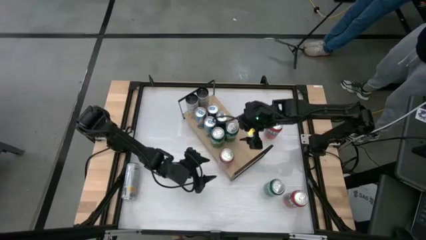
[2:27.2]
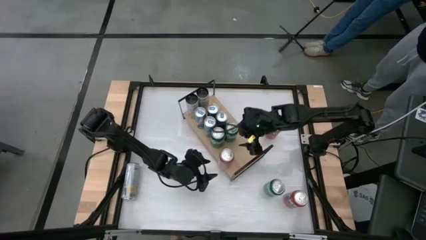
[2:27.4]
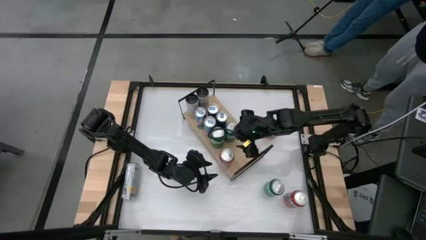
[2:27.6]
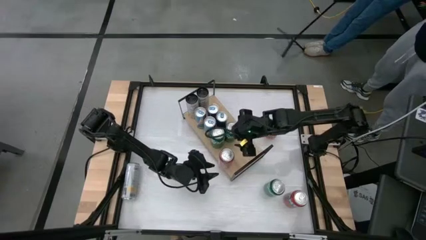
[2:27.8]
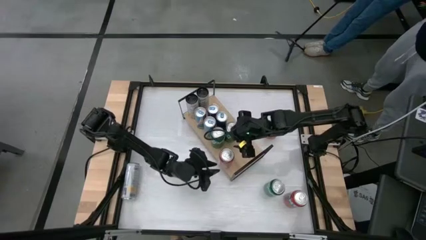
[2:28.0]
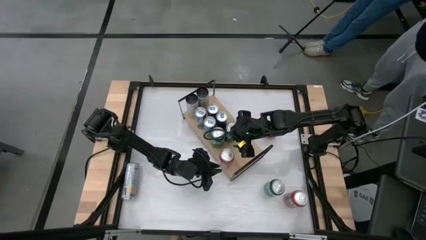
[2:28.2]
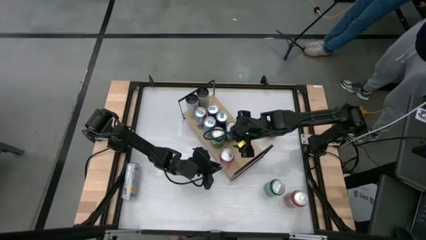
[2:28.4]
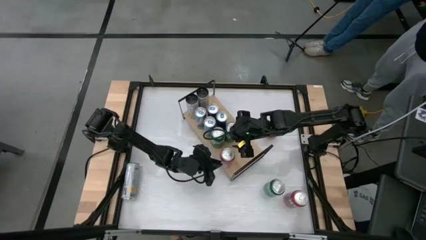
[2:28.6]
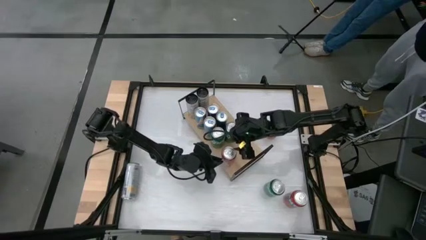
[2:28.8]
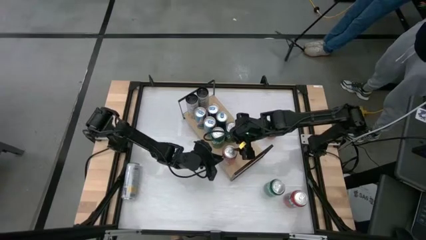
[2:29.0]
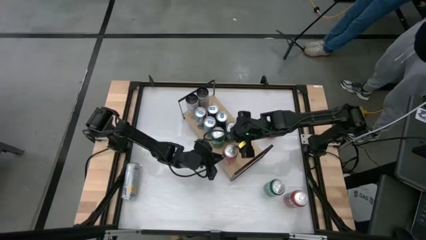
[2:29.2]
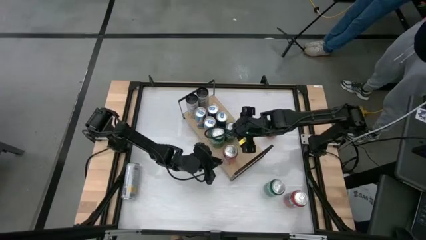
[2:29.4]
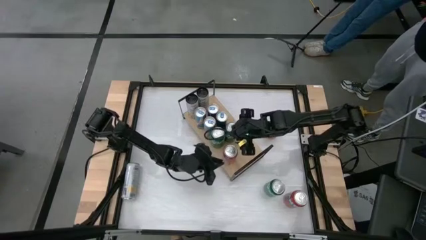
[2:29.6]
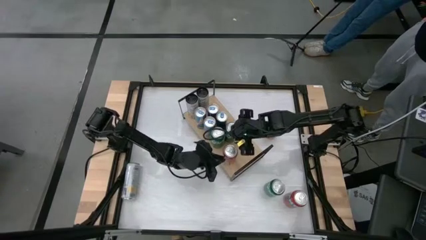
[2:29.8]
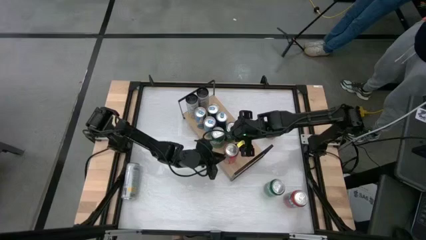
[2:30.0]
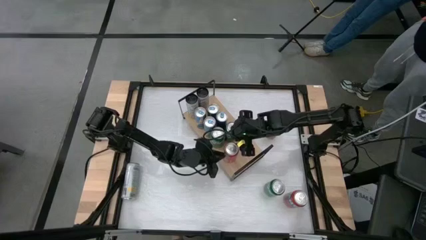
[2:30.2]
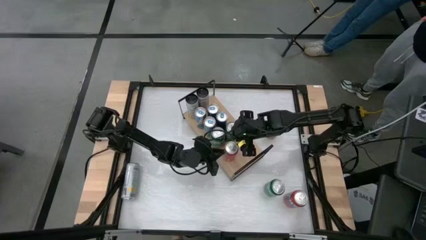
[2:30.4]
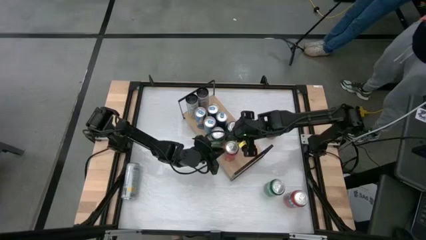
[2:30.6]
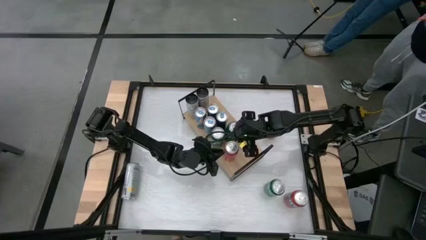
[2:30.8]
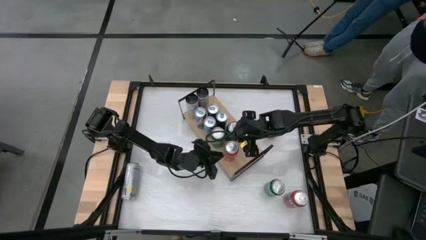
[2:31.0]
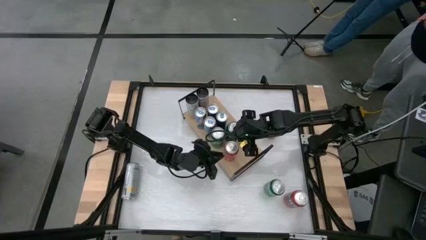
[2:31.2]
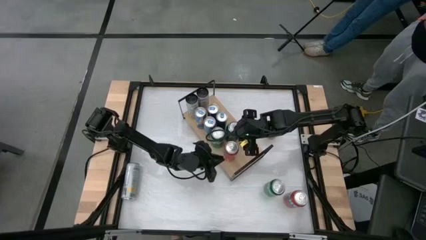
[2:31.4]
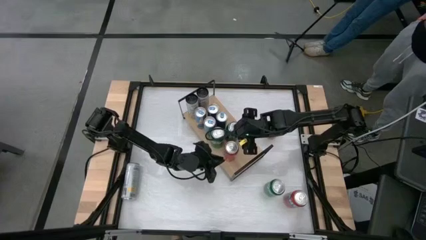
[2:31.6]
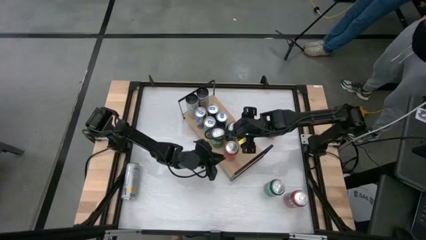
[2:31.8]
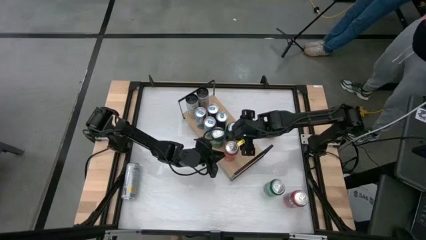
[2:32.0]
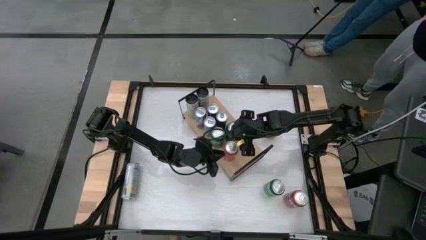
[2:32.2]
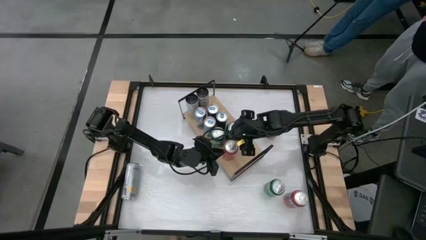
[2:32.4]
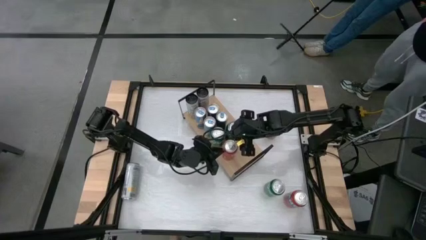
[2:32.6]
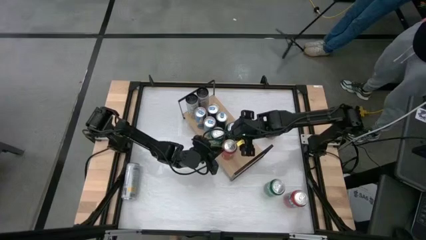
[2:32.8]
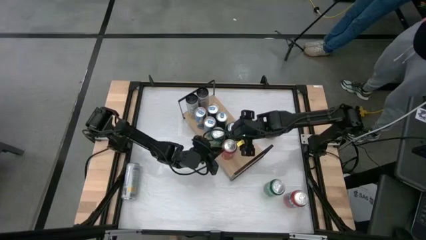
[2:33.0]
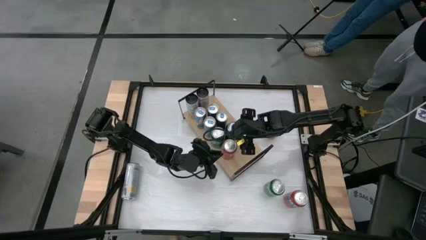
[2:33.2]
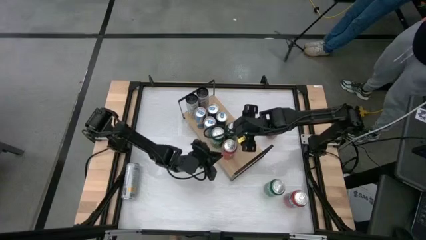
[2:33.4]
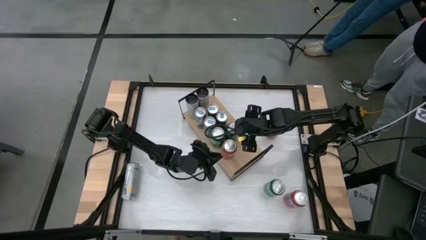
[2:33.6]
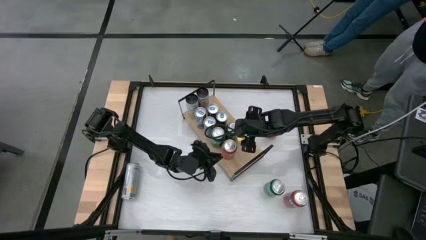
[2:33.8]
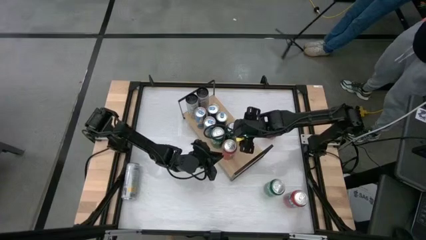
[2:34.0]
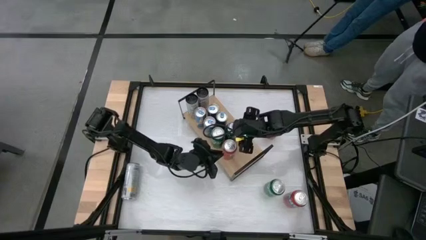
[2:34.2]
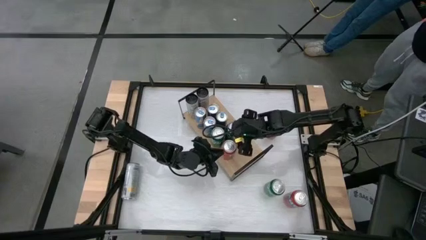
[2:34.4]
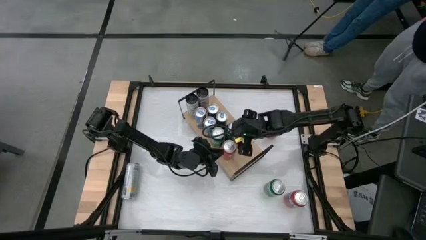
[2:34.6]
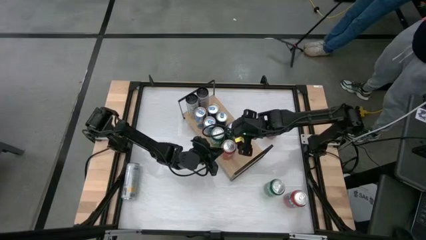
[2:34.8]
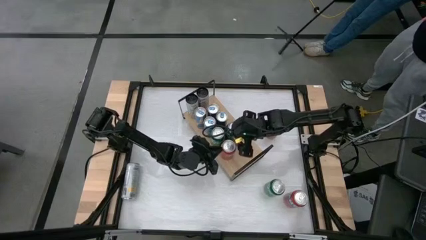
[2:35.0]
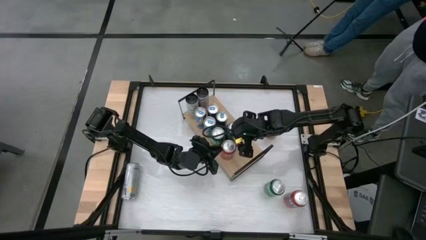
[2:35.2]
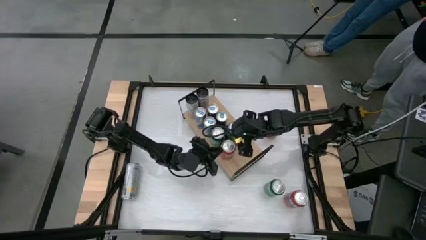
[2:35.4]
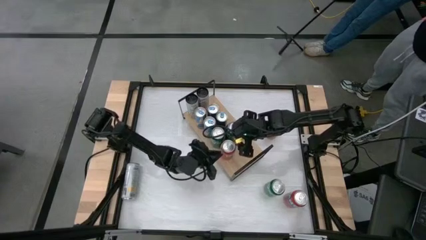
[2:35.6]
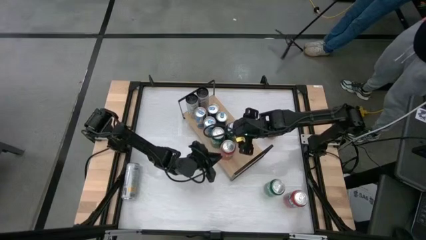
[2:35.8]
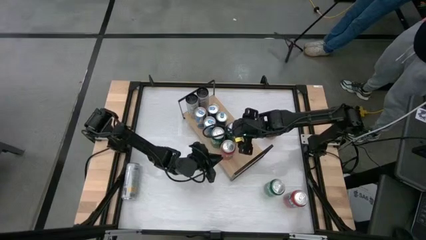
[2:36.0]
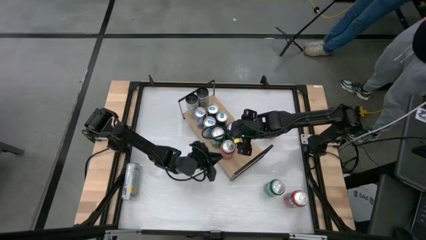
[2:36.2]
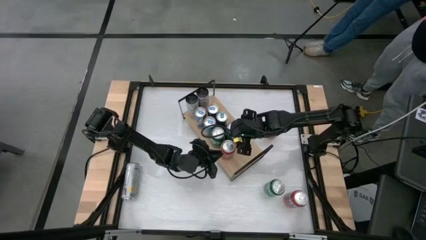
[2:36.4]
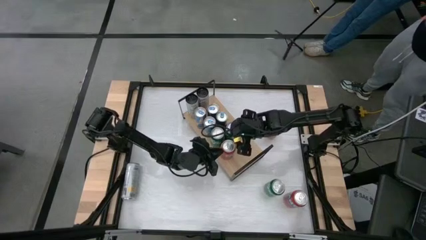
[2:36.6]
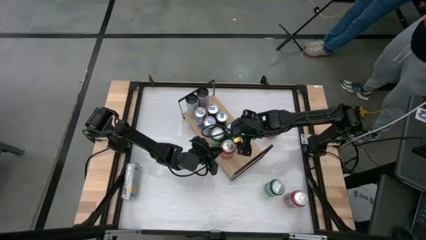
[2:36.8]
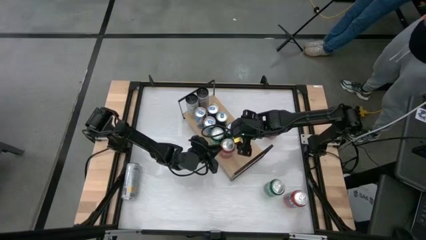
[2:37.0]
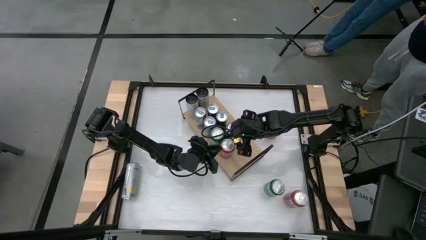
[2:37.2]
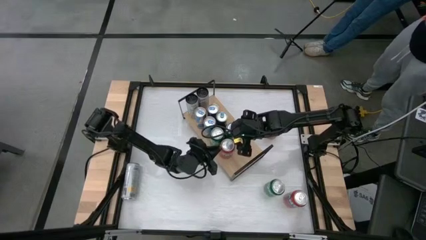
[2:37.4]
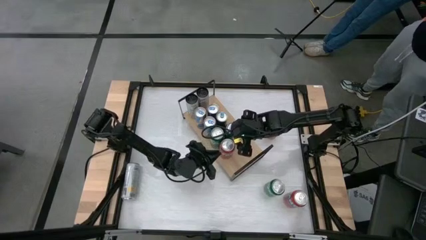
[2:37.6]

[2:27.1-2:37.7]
Task: Place canned beverage on shelf
Put the middle red soda can on the shelf

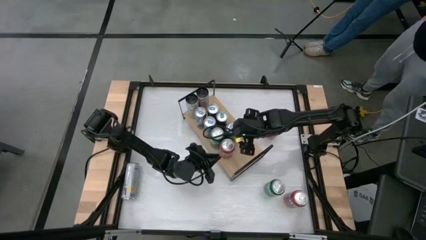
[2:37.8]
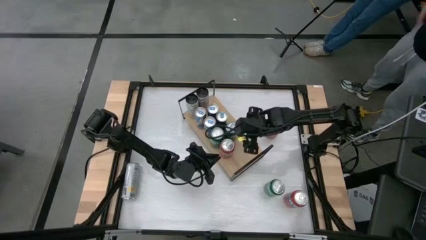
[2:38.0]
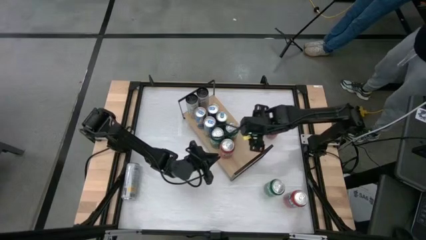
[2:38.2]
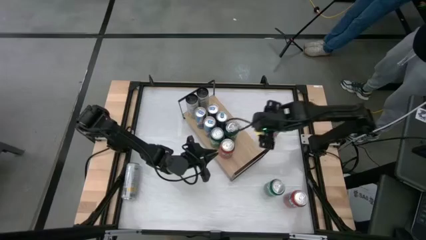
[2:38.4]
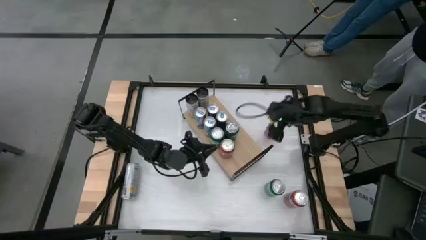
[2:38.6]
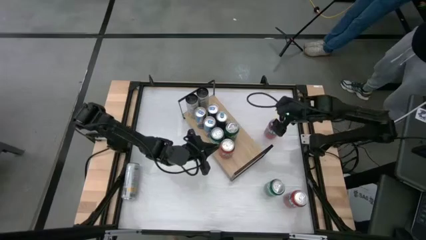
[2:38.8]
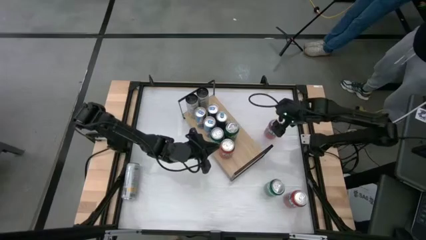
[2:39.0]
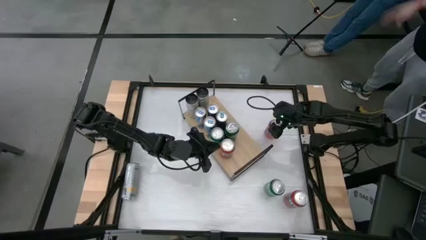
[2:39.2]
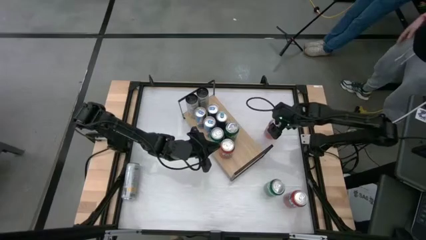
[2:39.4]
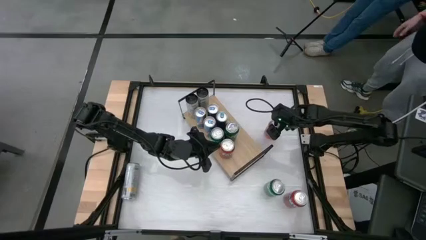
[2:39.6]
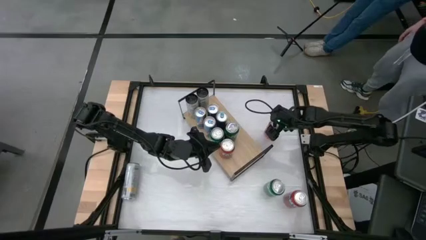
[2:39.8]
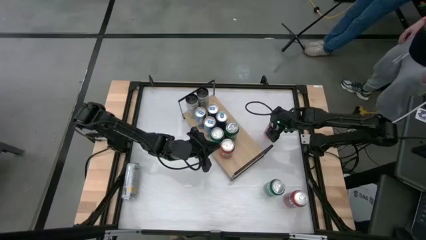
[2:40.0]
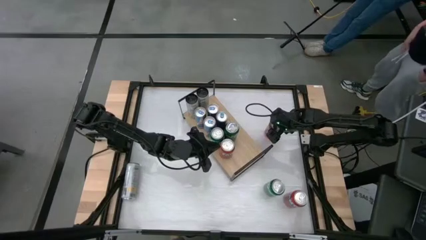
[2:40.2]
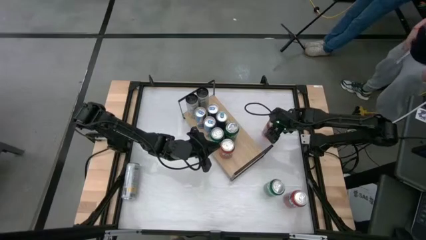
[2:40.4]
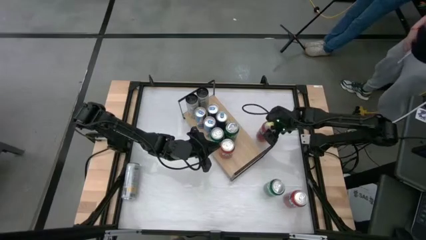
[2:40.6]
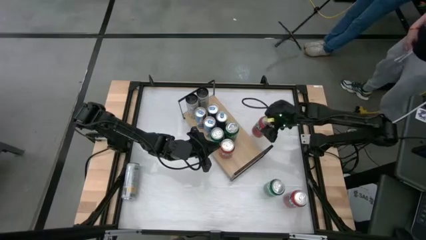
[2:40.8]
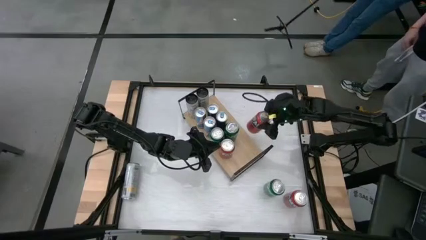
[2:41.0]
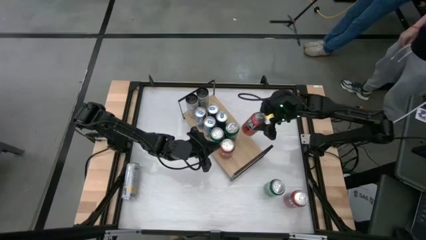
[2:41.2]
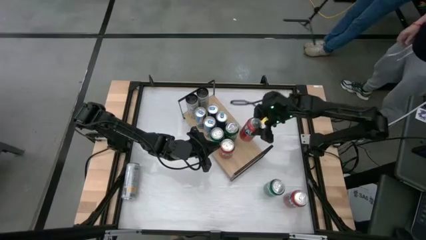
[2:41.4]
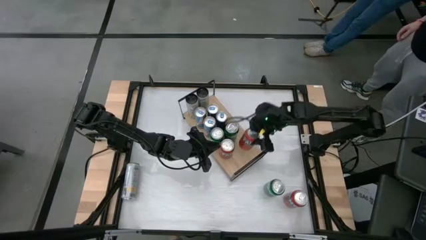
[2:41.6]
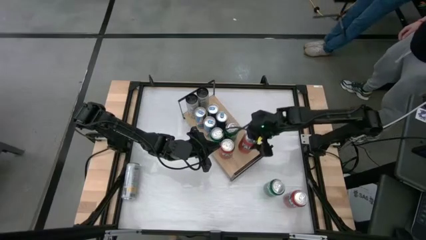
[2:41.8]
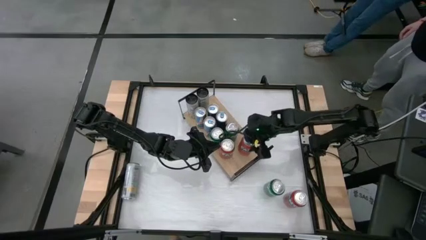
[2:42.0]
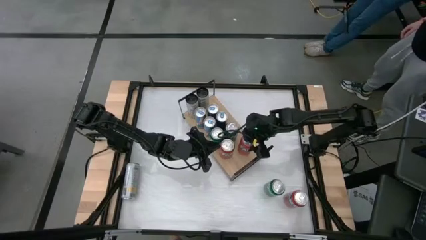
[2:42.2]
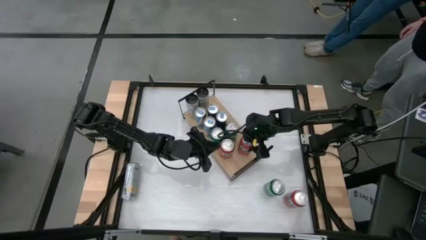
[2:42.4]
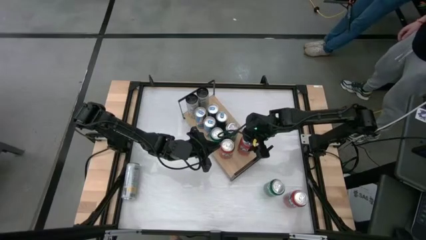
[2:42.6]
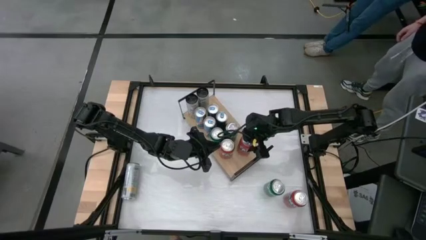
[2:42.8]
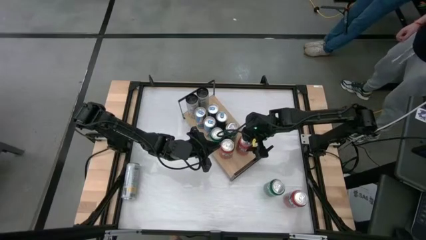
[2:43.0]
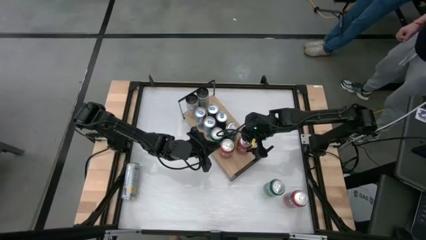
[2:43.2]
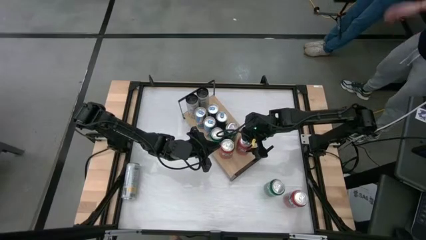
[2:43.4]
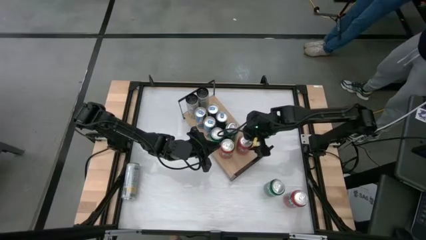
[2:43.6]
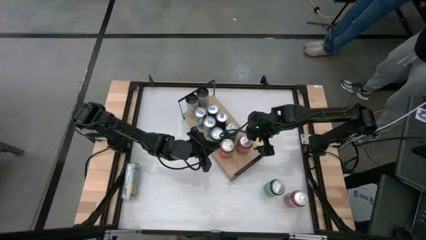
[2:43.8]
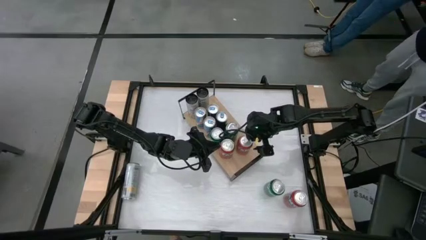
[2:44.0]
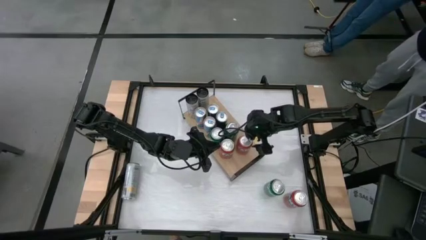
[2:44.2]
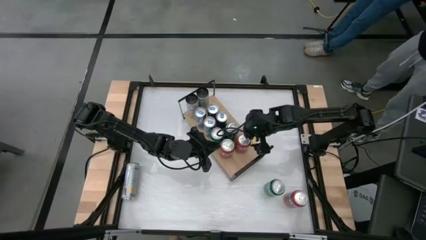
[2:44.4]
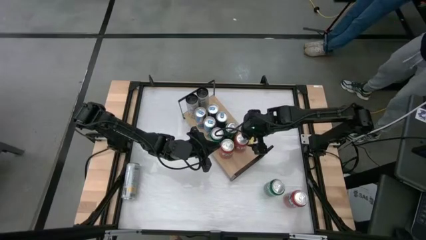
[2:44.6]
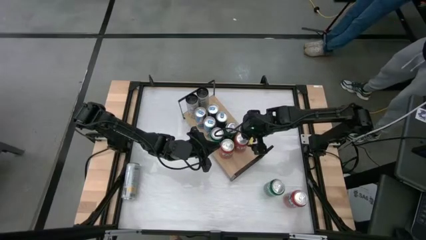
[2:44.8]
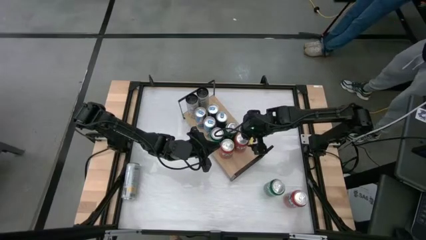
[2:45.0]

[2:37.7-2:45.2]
Put the top red soda can on the shelf aligned with the other red soda can
